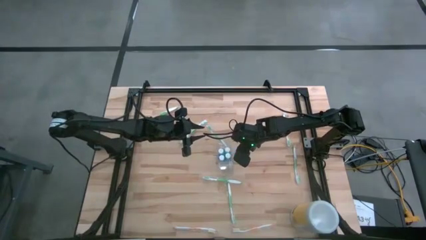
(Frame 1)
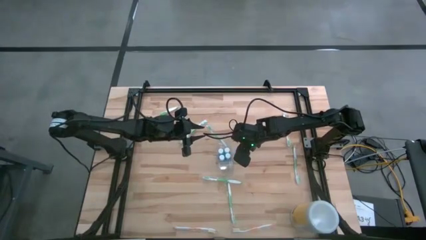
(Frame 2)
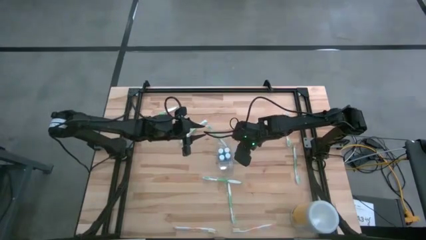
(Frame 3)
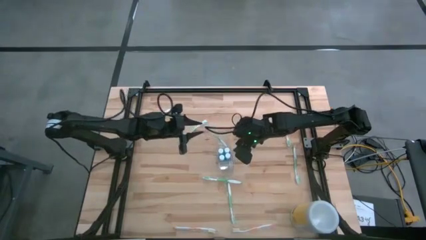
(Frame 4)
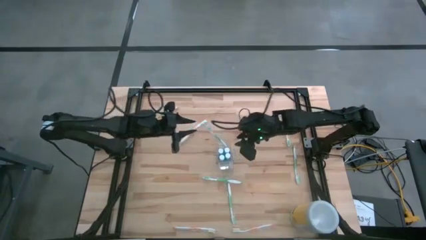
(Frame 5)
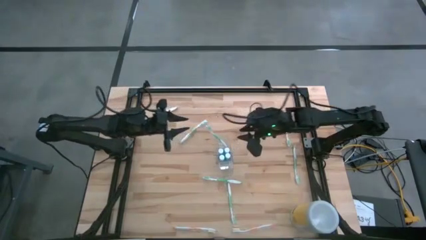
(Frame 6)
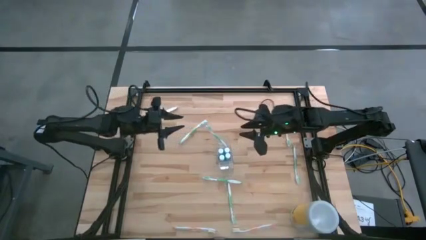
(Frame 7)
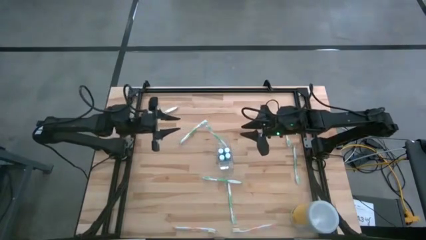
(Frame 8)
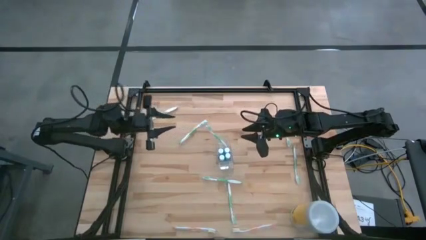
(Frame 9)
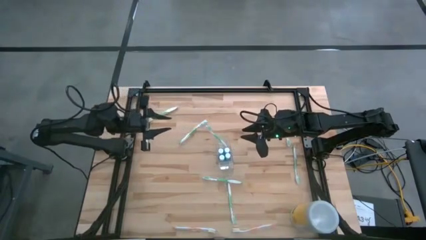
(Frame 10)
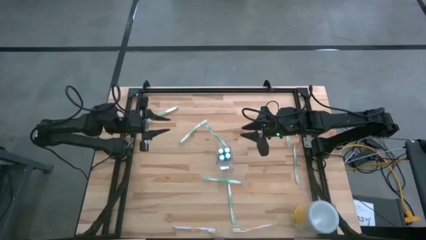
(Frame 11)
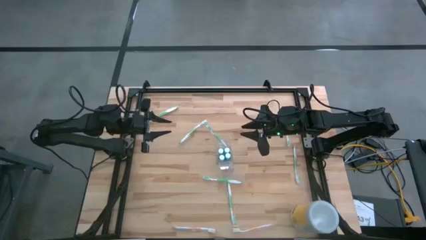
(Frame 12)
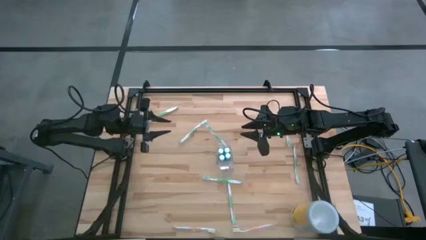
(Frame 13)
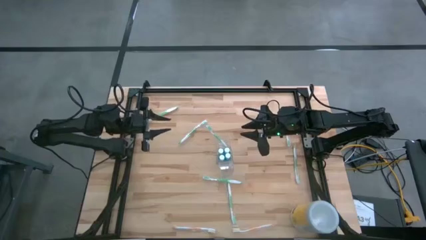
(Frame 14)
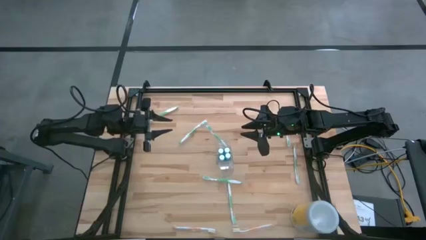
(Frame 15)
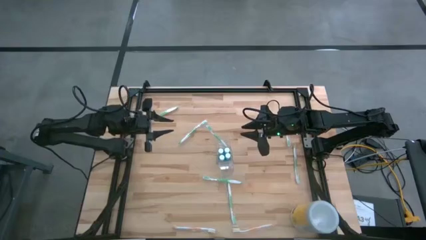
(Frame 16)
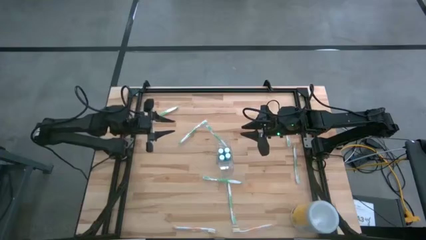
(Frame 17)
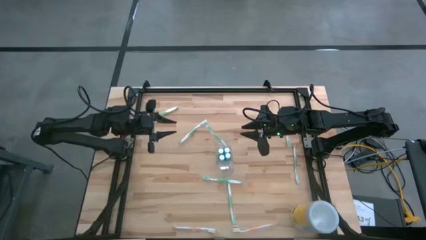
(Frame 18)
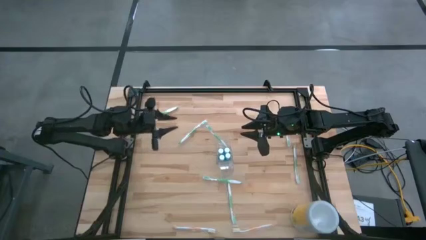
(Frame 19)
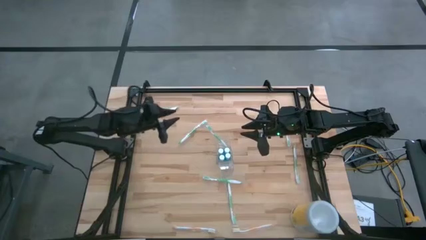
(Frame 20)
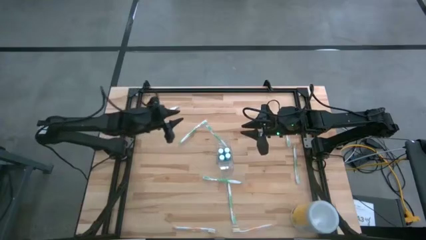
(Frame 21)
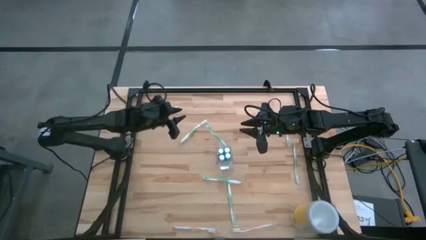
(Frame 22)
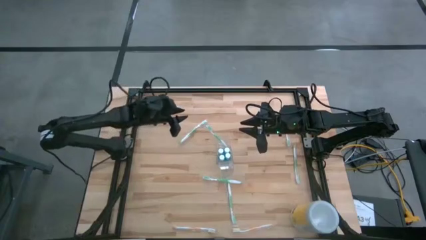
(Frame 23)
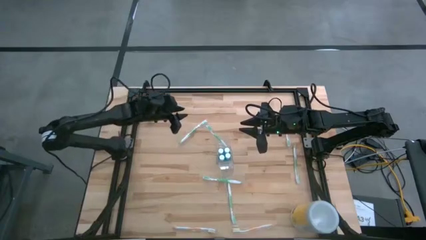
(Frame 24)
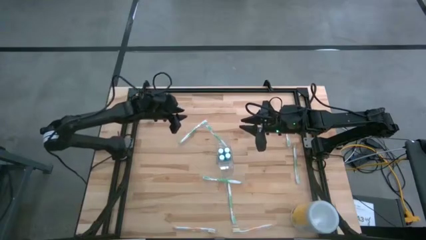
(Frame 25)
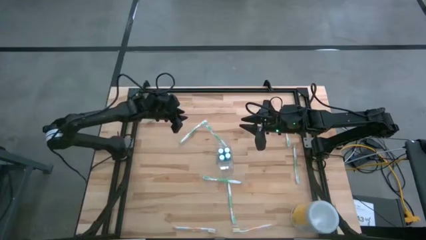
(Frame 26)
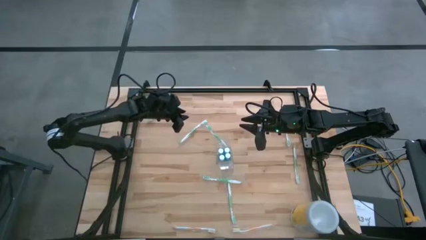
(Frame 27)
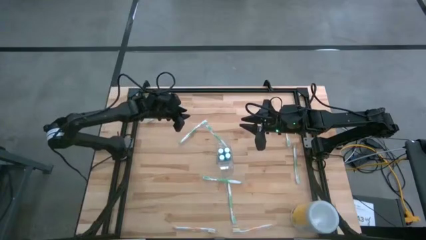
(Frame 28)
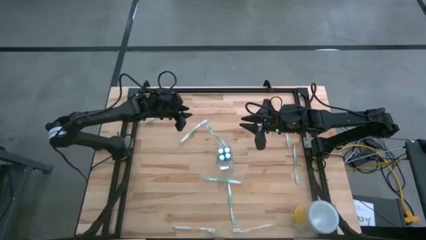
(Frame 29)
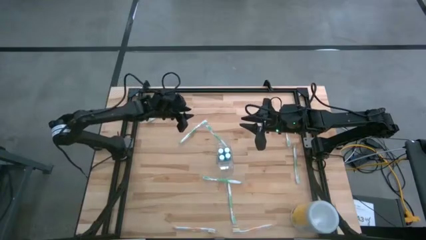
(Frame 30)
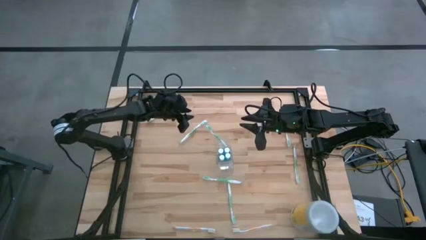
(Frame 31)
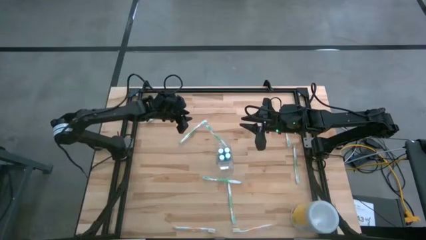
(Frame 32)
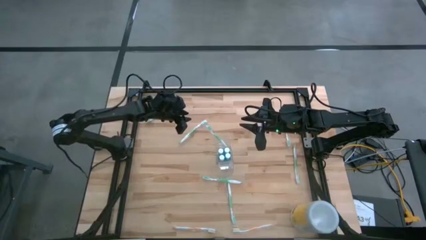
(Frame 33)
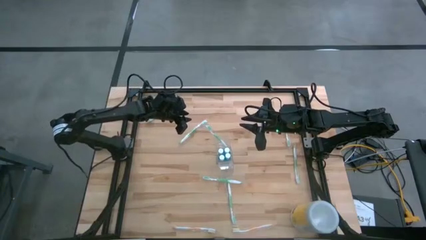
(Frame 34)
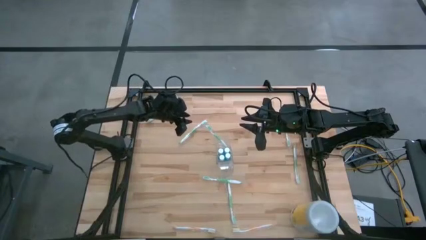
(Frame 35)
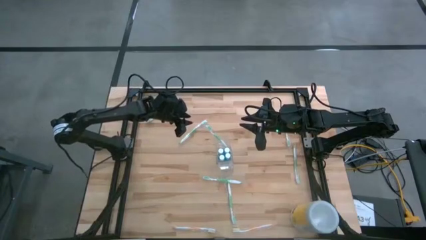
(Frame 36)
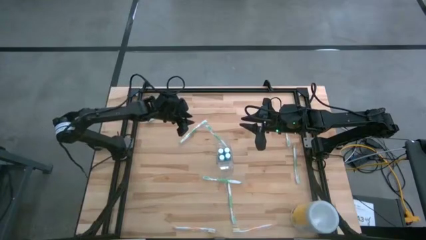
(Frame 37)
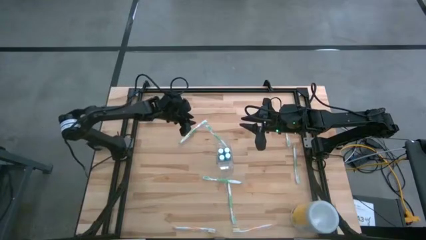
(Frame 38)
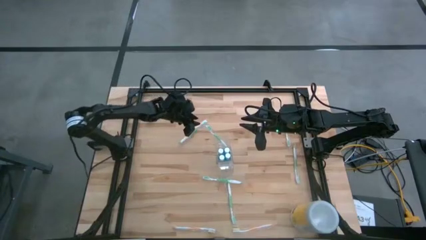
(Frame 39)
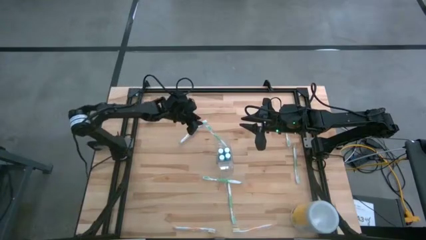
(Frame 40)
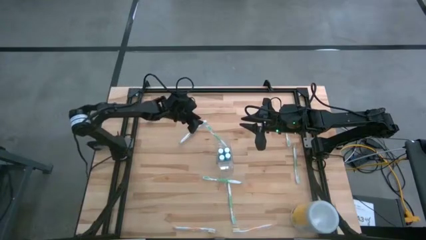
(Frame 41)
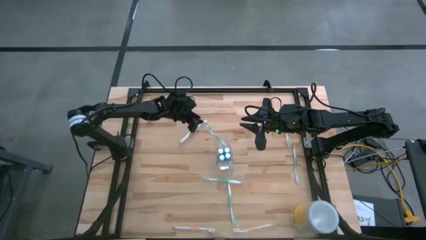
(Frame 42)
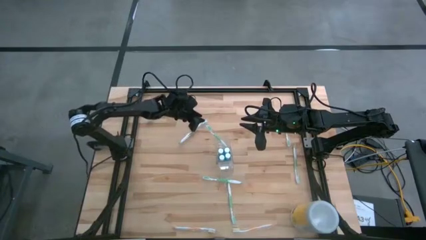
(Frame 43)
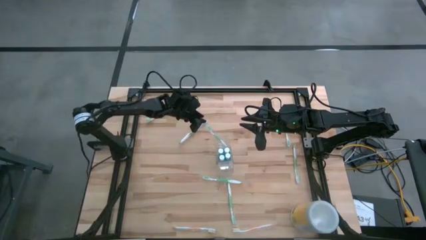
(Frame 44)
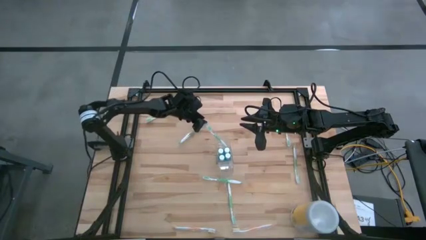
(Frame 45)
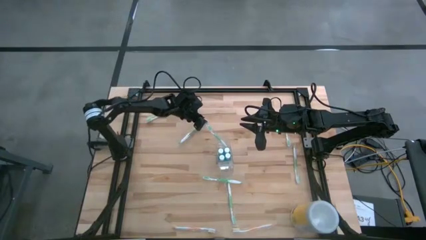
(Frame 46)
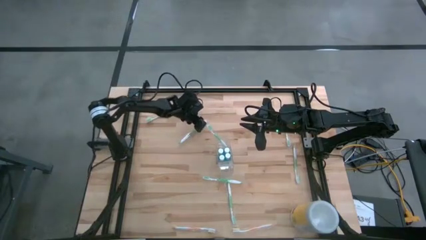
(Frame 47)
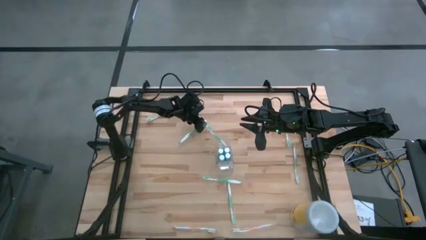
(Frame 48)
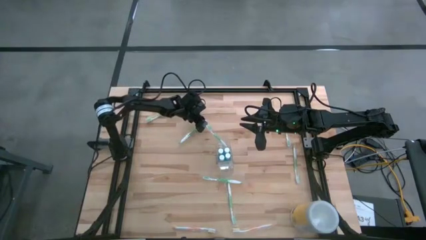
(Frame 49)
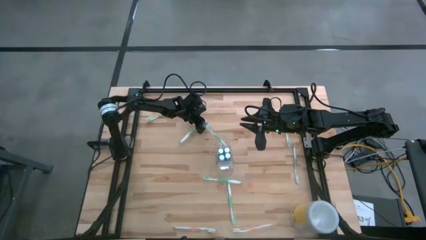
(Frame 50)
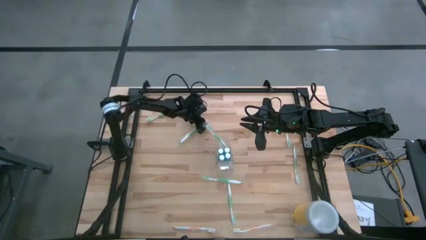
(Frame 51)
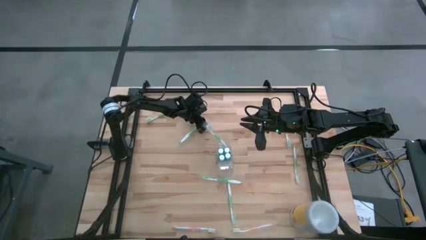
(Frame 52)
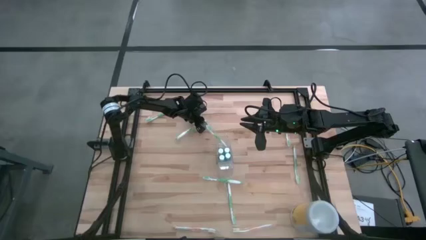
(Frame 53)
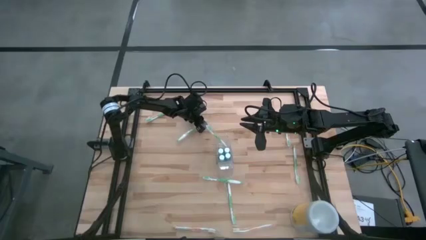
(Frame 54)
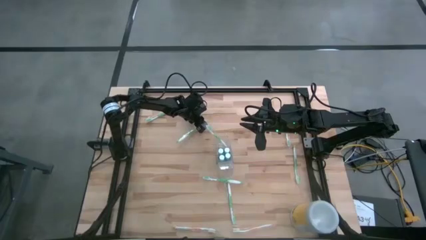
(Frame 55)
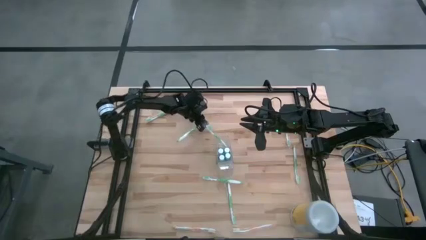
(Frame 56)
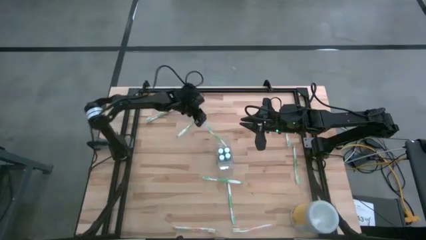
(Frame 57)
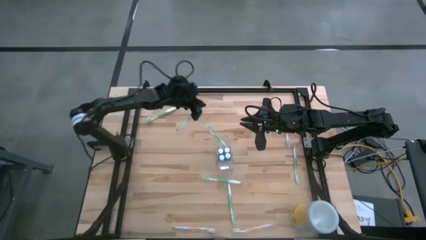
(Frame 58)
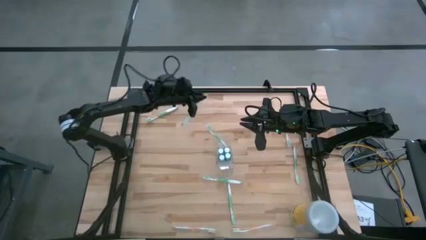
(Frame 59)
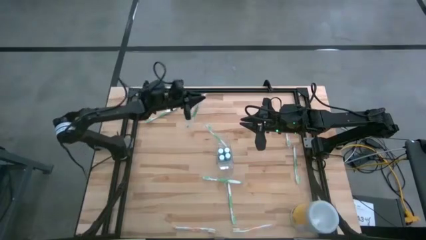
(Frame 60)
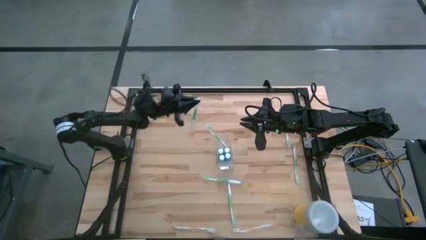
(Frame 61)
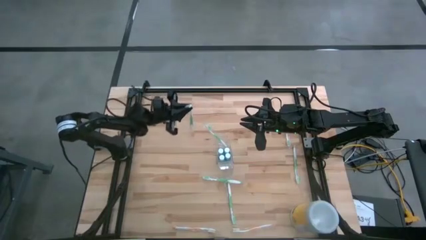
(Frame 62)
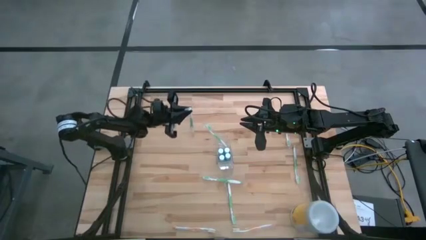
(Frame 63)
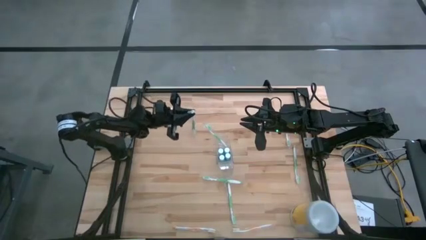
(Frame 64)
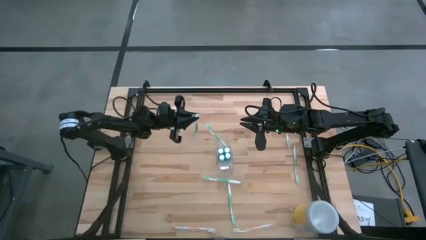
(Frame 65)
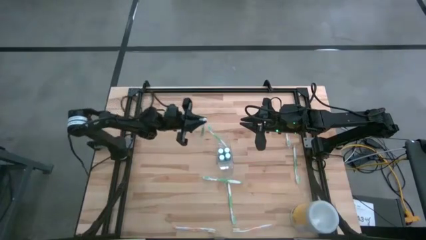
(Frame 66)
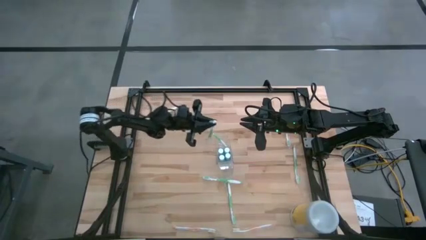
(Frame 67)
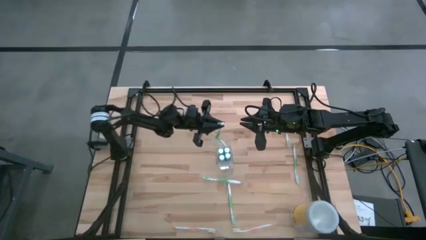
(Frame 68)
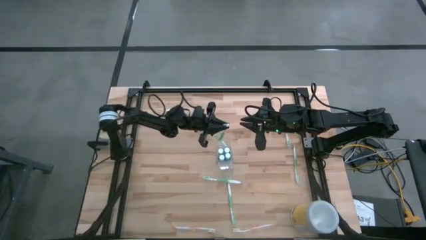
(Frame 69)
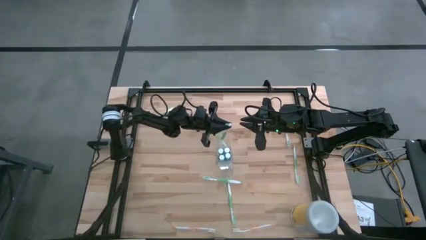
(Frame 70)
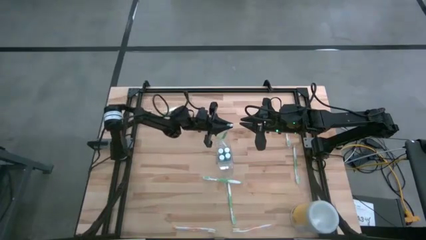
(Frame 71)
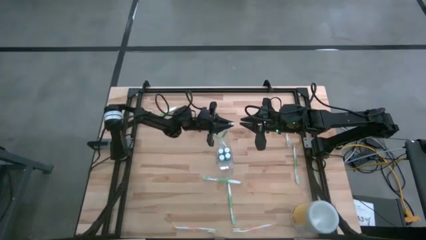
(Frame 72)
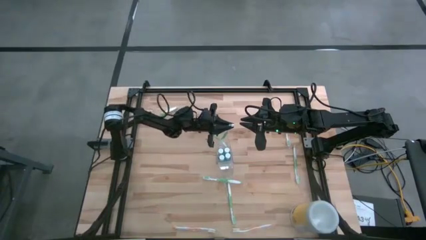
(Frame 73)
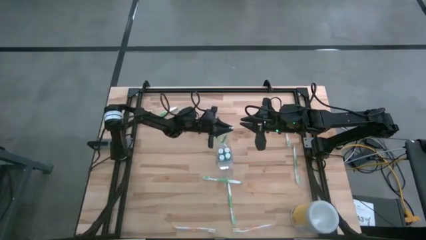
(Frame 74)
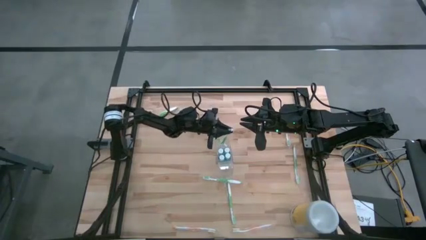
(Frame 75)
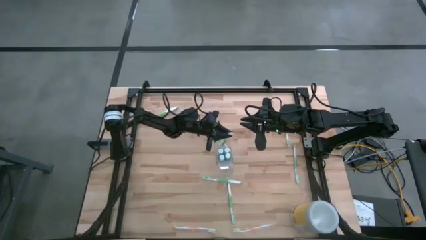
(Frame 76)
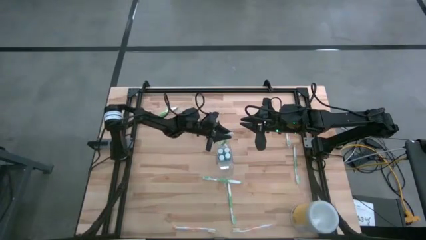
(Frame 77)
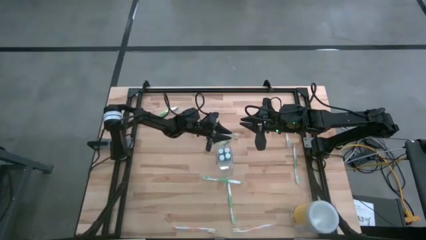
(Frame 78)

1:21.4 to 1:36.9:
Task: Pick & Place toothbrushing station
Put the white green toothbrush into the back side of the transparent organizer

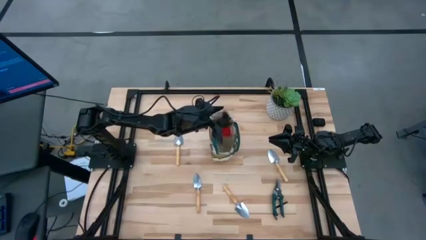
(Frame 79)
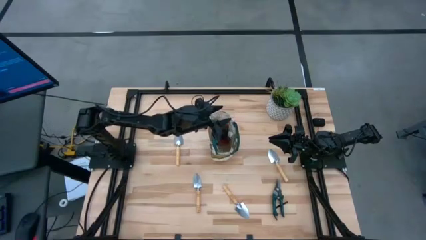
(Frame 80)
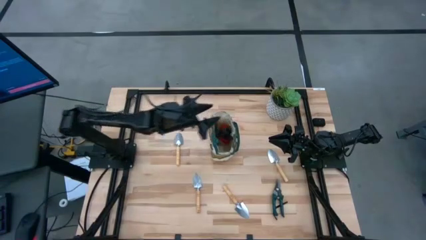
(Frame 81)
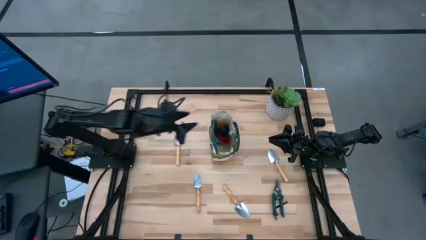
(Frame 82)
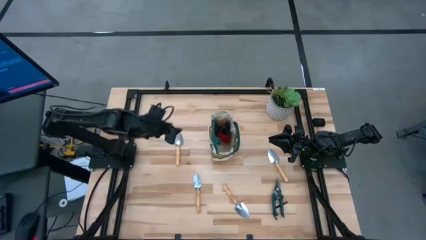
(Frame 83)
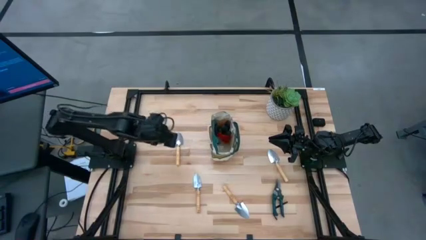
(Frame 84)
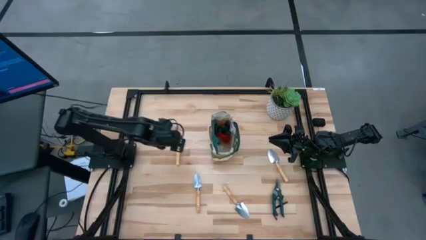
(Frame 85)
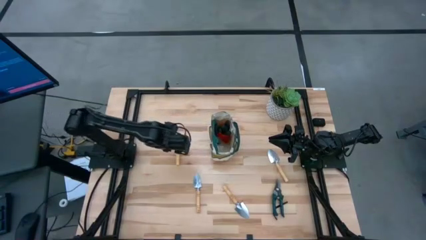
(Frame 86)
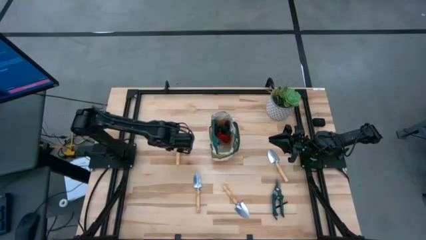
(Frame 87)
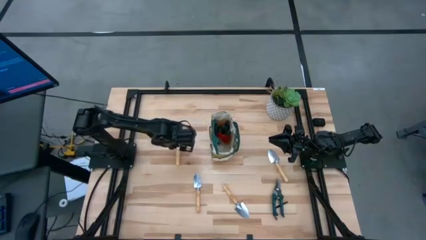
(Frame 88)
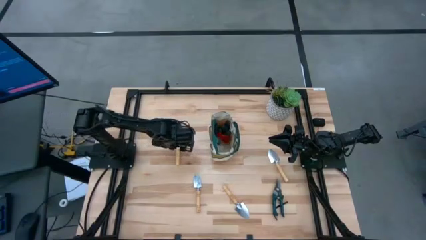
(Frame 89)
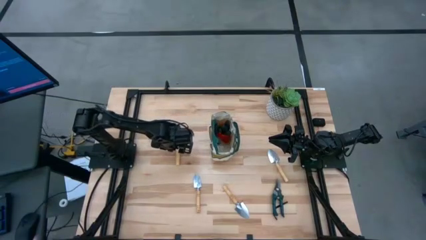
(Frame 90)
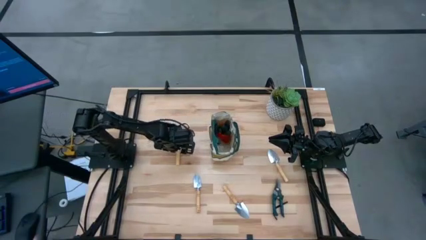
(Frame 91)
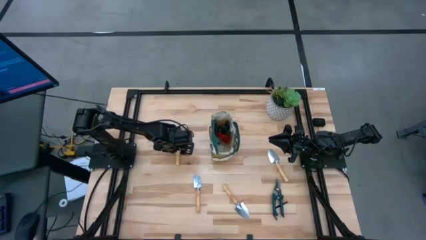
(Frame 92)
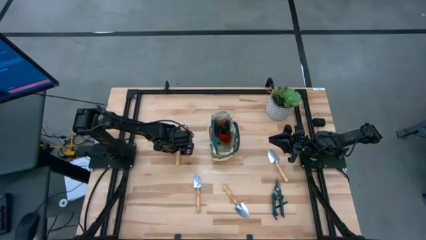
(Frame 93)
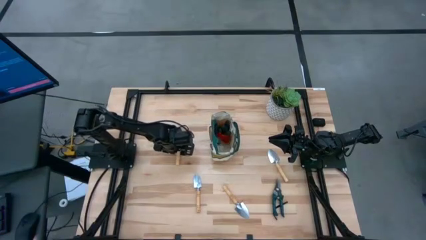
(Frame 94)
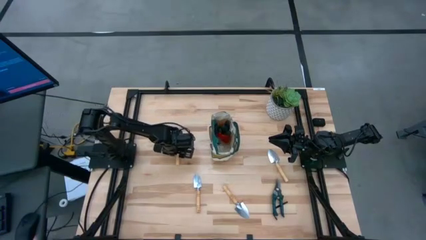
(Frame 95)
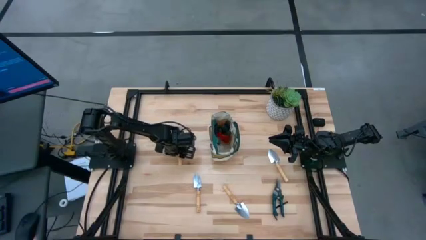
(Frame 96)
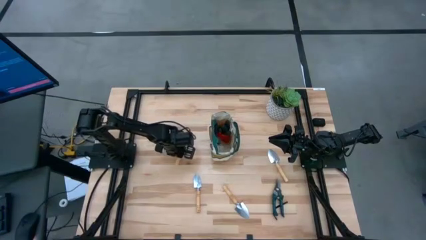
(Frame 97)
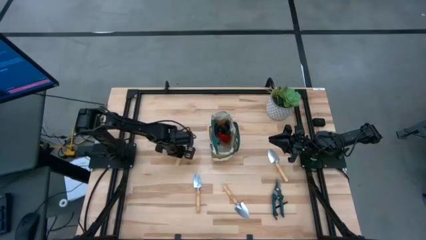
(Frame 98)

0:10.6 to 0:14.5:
Task: Pick & Place Garden tools in Gardening bag
Put the brown trowel into the gardening bag
